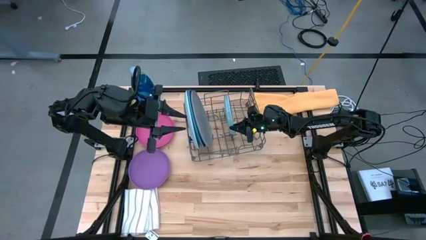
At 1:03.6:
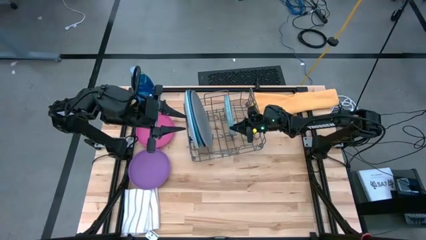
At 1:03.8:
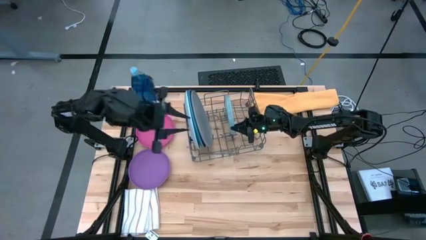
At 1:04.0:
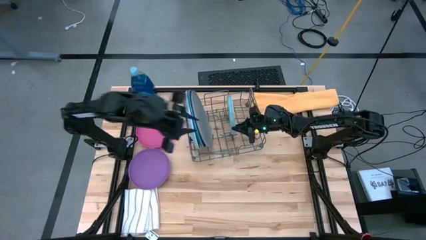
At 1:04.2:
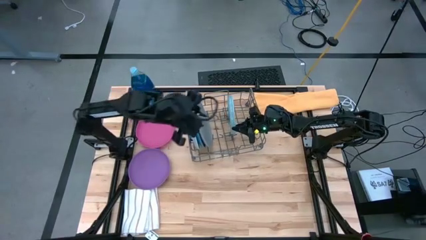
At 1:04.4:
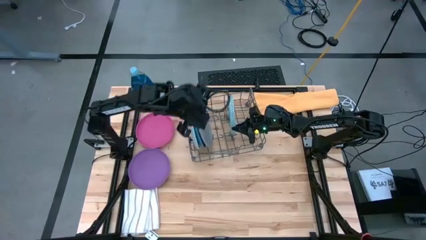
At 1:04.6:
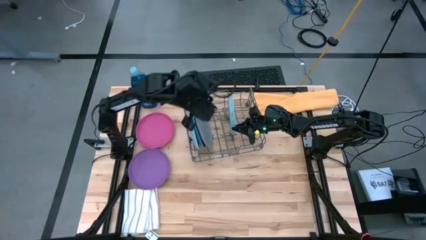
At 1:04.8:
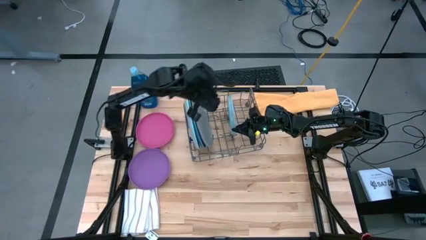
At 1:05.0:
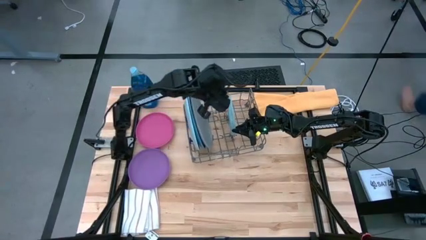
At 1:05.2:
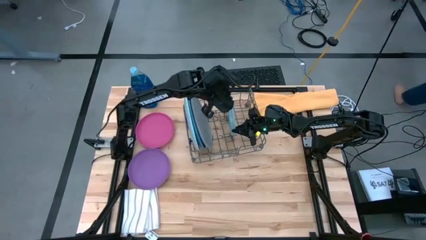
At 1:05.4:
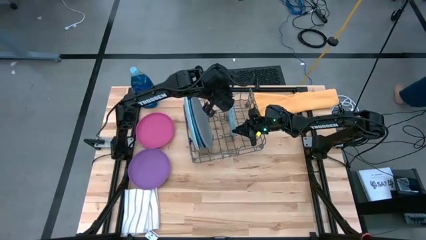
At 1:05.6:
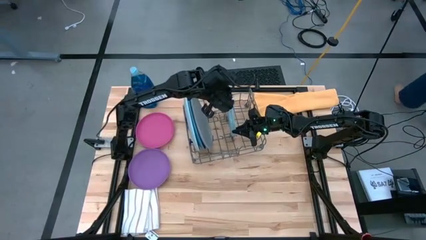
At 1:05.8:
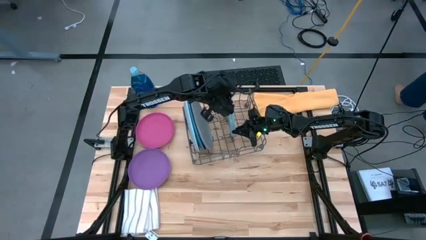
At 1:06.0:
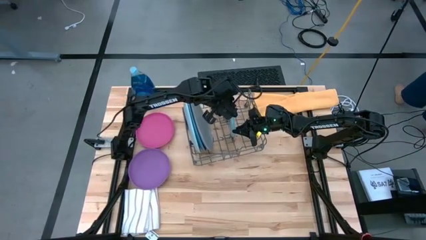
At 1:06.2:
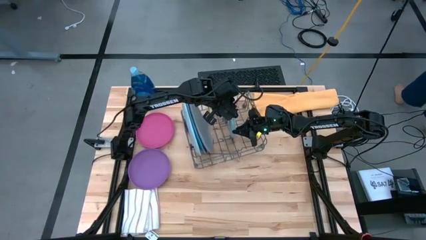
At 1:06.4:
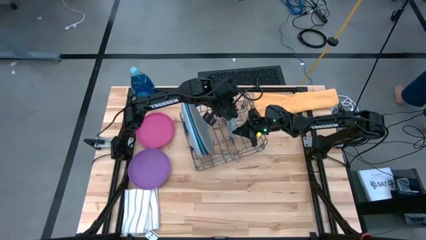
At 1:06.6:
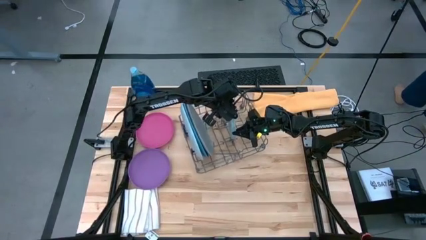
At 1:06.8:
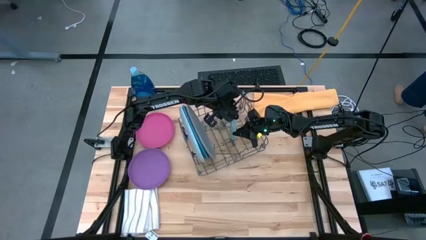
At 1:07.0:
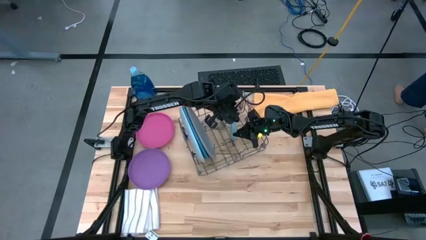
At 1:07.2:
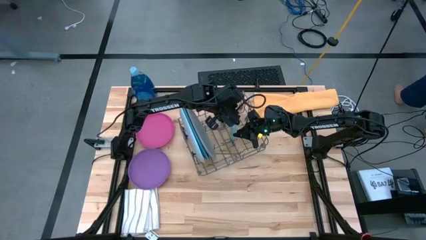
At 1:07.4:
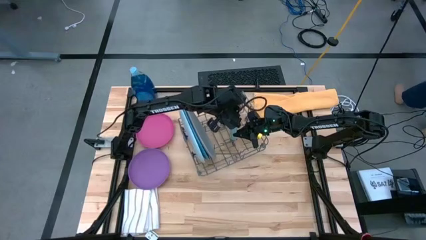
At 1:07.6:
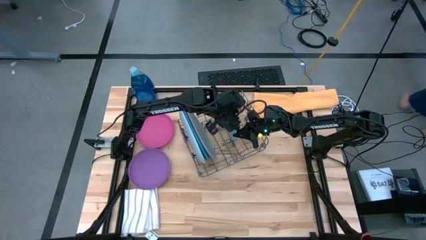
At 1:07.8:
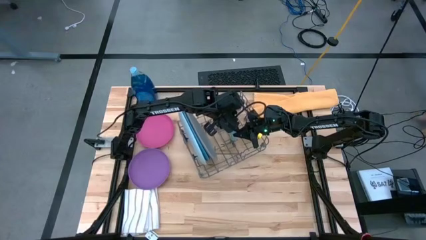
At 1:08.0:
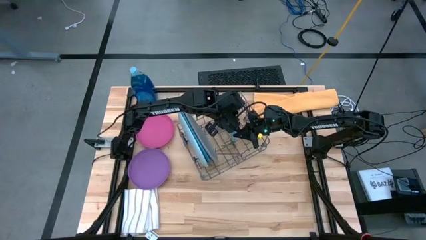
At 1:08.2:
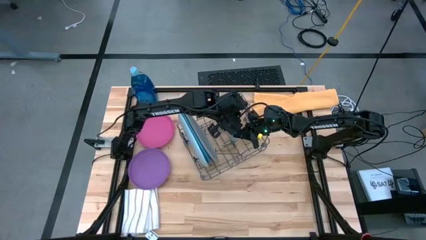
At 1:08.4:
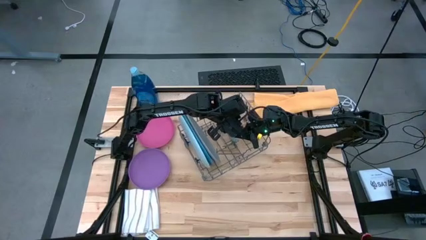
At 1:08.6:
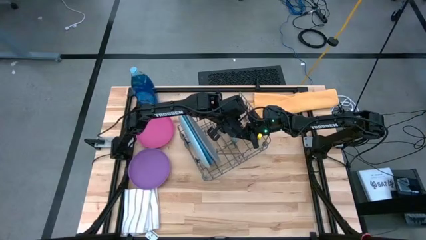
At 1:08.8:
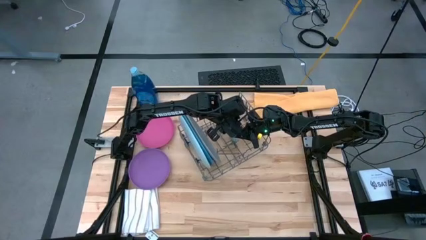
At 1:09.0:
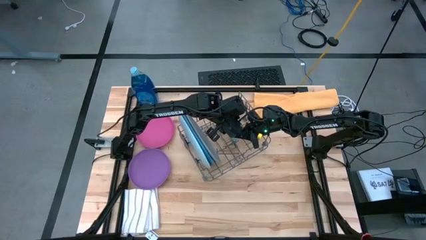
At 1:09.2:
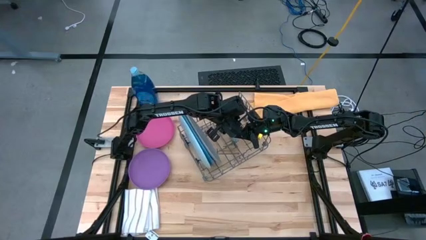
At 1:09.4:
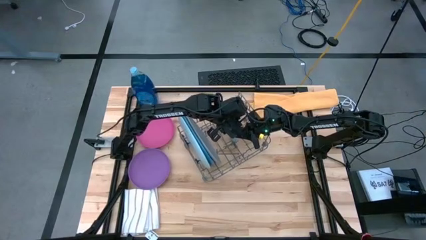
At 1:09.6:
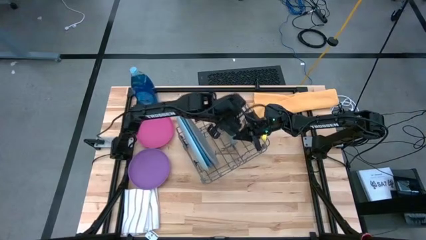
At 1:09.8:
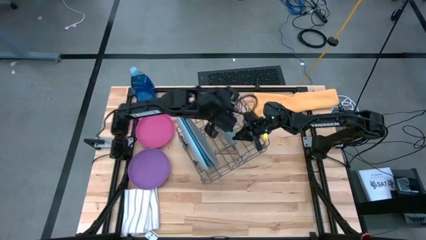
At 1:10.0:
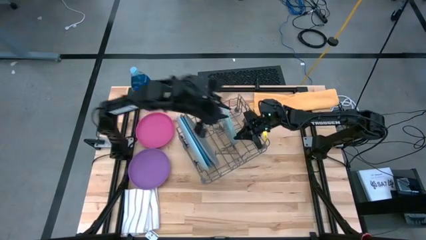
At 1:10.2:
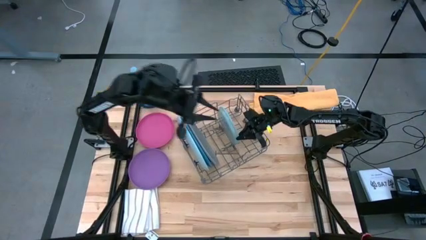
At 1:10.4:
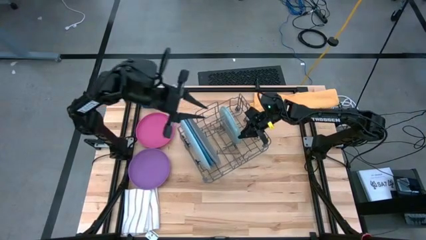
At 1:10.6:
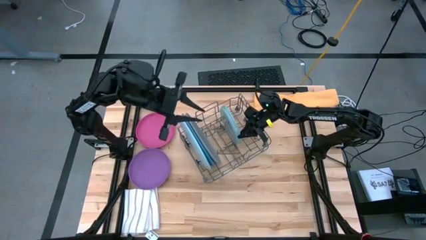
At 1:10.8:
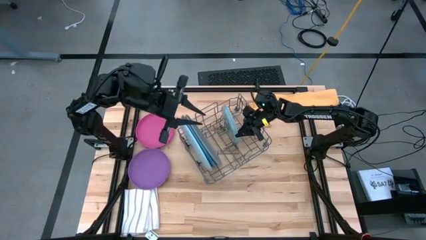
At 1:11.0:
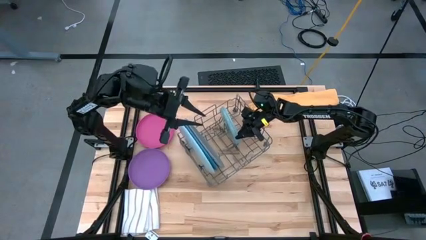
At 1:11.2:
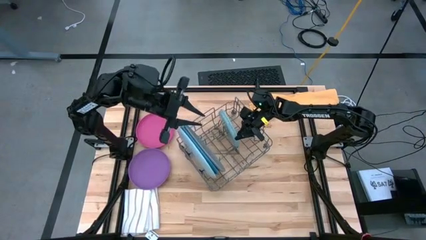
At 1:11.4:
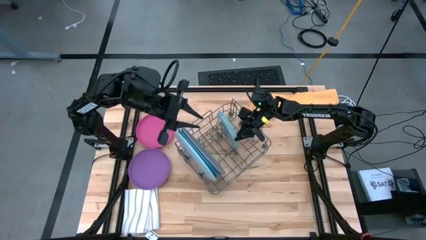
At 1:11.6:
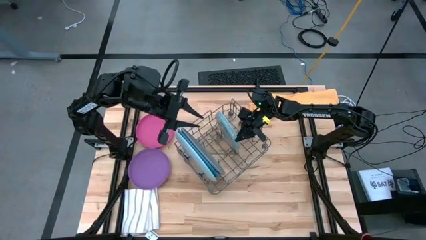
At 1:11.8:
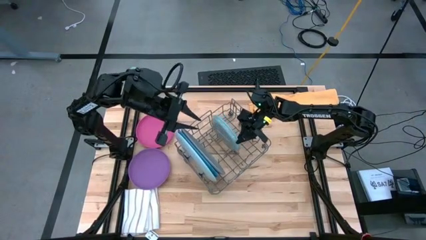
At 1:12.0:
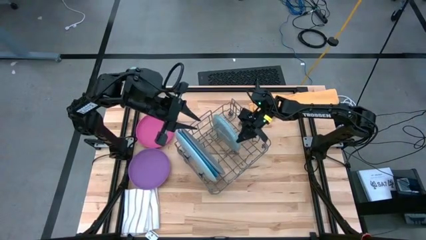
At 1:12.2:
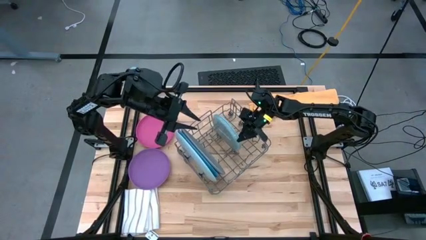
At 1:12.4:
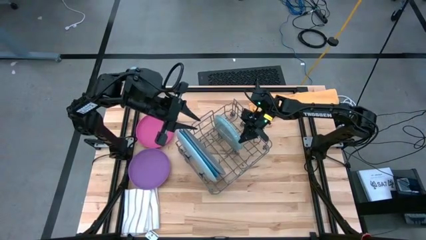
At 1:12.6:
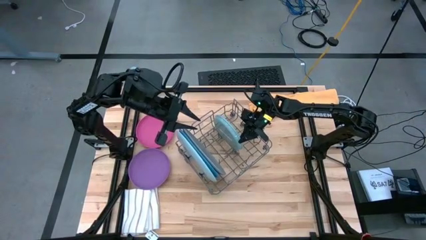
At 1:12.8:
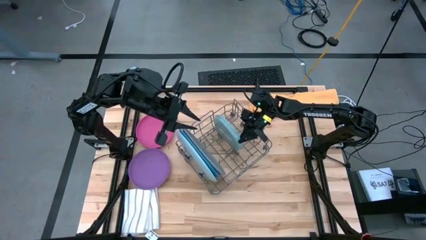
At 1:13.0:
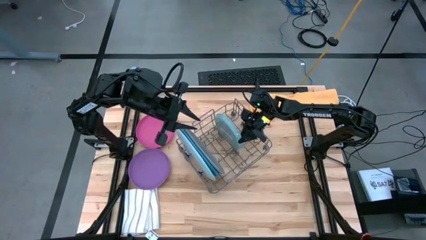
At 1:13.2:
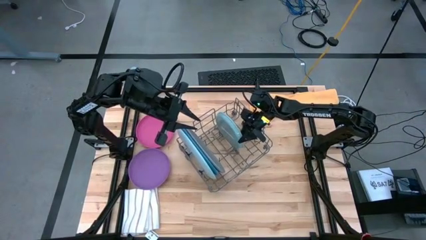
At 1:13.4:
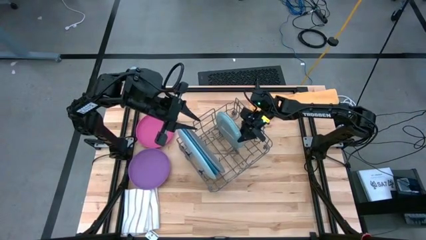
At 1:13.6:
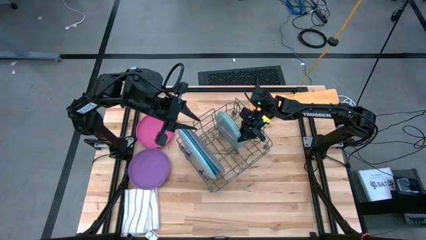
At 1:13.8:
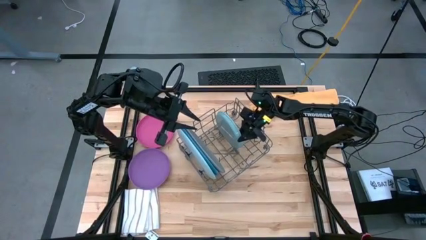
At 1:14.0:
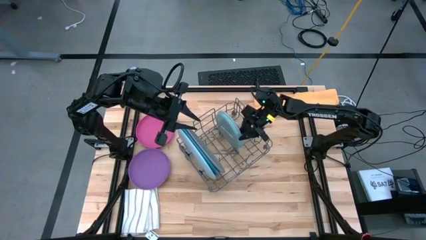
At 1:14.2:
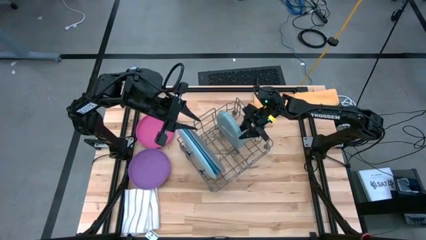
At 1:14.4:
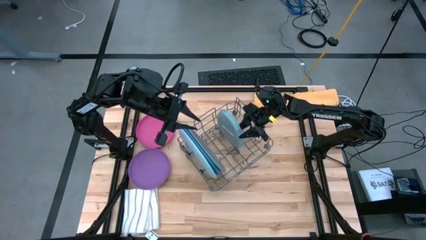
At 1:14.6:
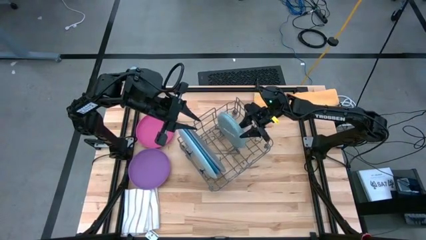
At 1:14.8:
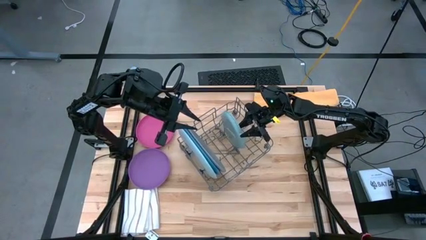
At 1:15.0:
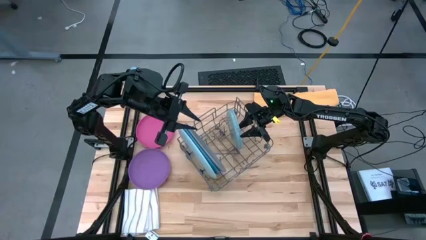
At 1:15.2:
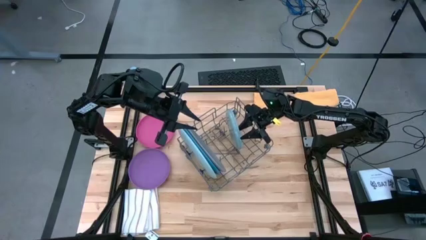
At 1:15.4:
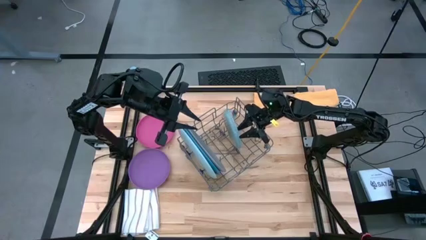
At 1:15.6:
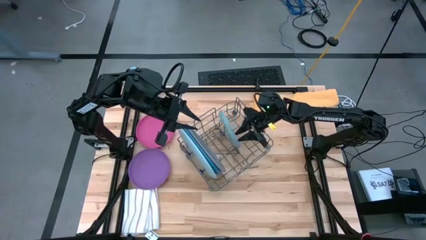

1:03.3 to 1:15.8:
Task: Sort dishes
Put the light green plate into the dish rack

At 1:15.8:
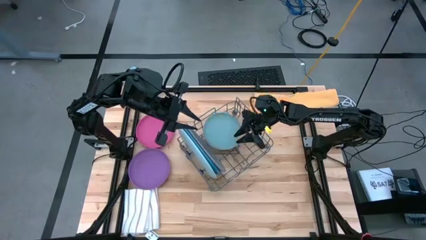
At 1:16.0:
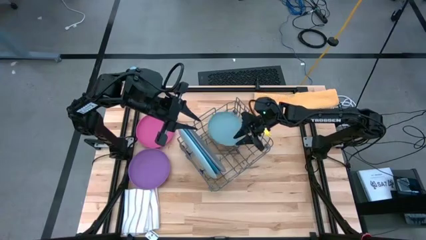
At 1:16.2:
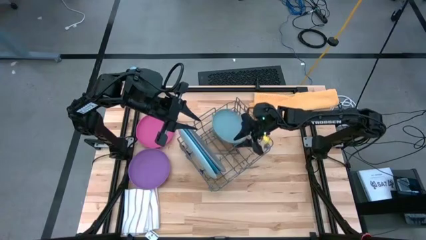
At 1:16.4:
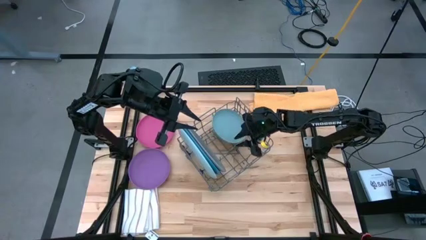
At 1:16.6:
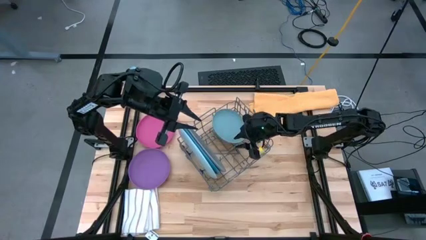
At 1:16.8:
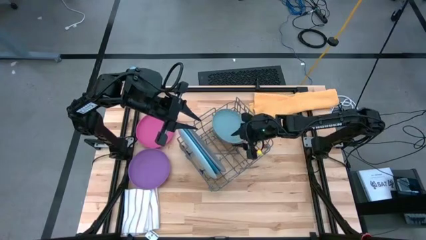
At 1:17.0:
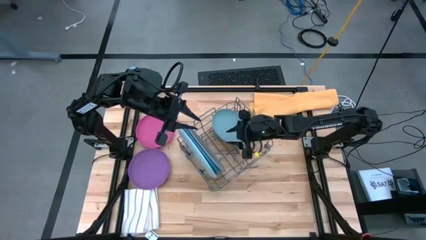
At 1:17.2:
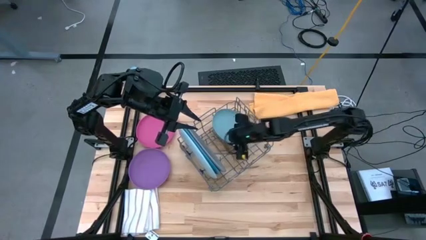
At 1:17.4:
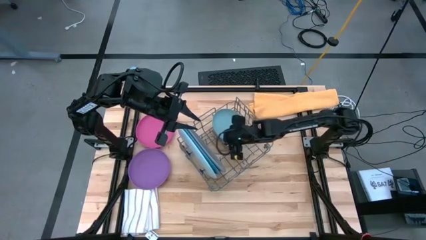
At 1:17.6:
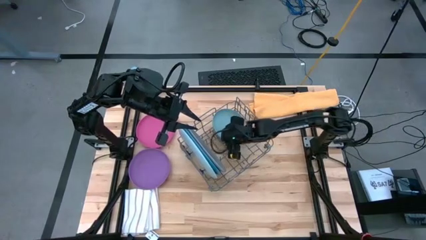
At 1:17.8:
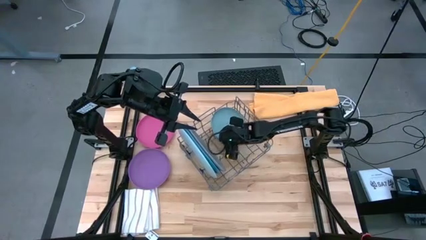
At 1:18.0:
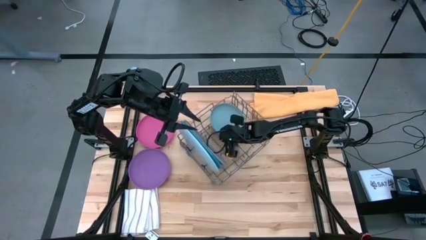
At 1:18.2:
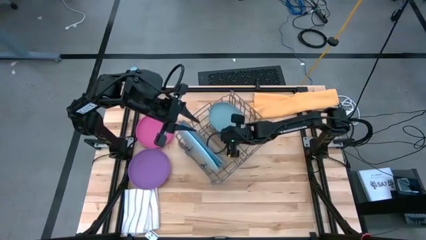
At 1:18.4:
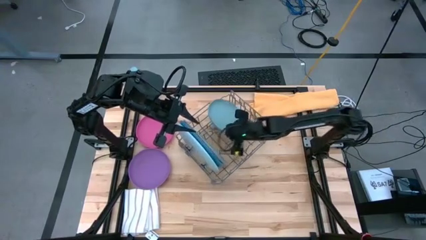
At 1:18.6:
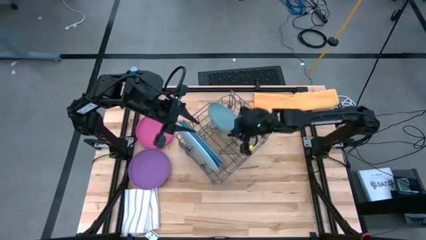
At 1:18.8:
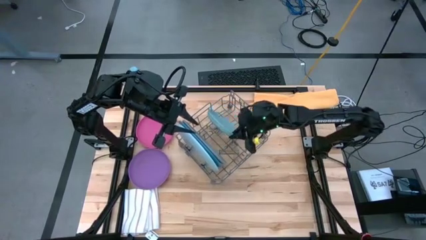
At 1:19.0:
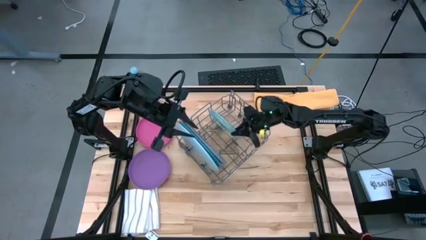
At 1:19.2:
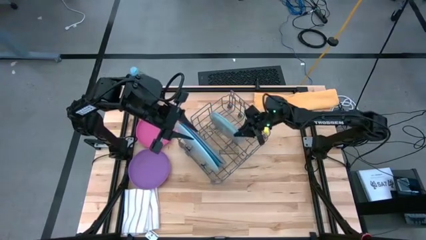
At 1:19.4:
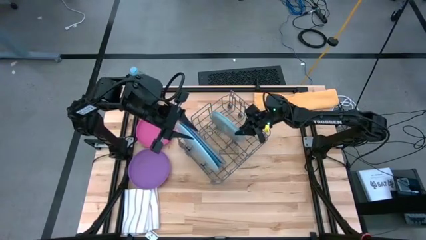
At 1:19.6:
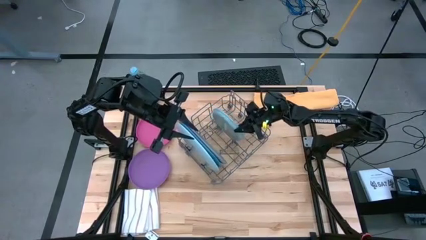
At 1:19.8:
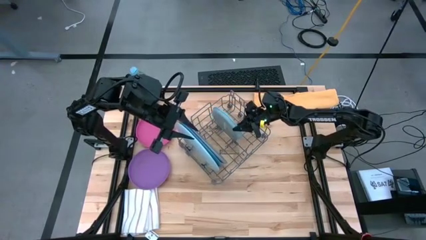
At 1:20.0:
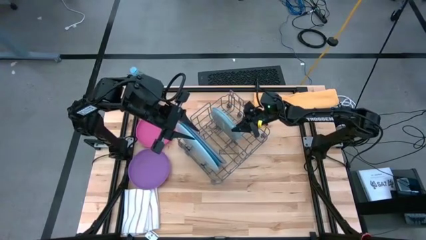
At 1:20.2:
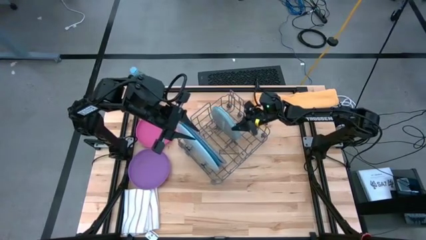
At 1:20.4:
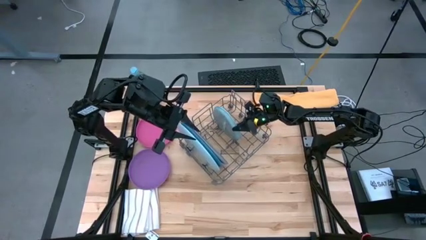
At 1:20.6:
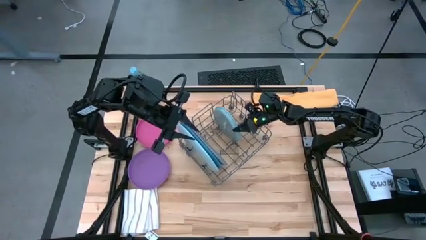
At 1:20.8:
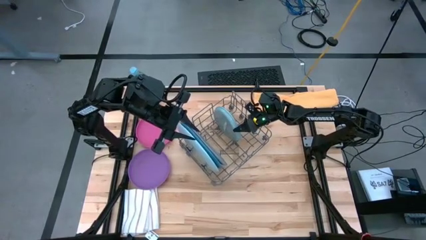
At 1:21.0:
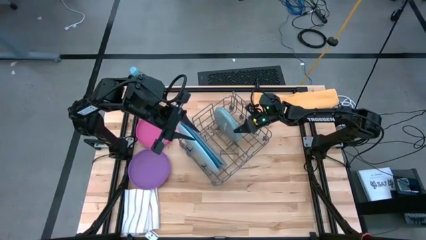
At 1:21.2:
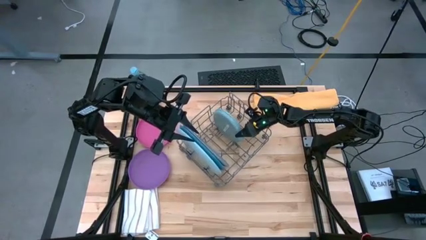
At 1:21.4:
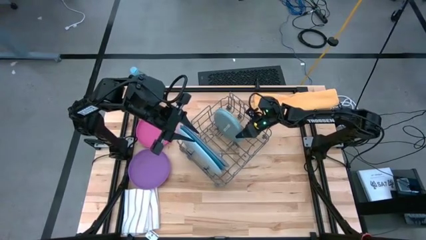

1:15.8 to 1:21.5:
Put the light green plate into the dish rack
